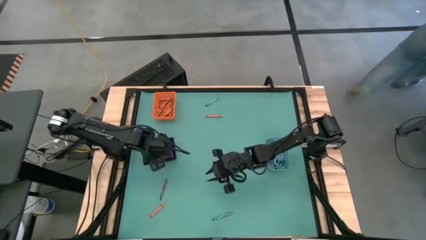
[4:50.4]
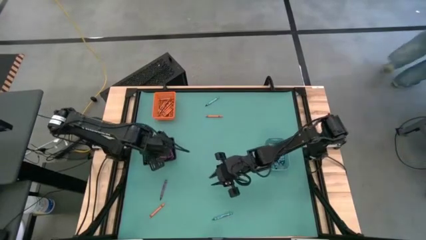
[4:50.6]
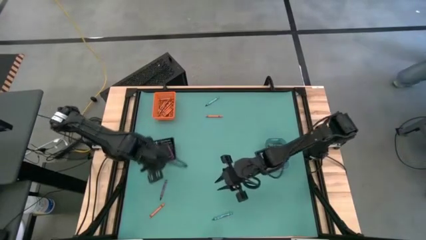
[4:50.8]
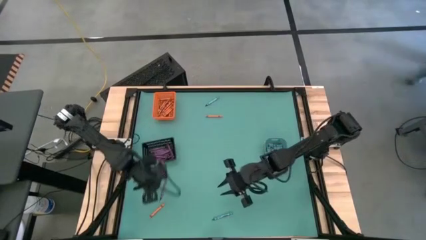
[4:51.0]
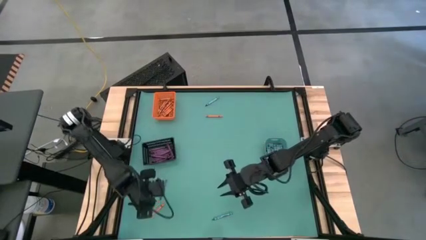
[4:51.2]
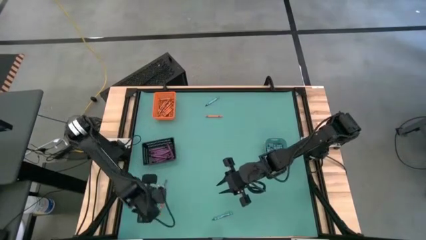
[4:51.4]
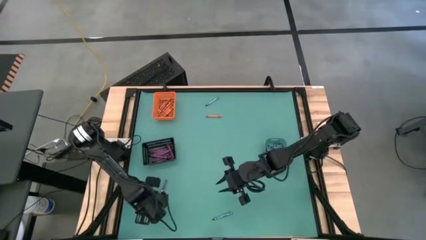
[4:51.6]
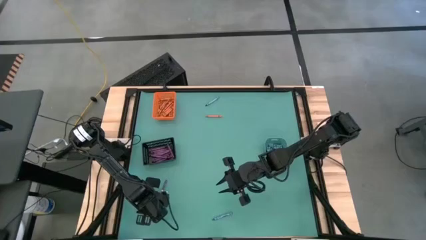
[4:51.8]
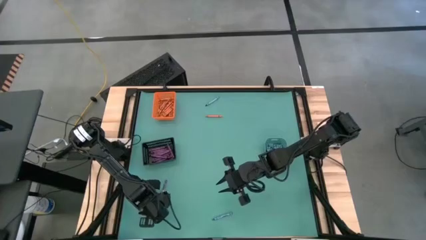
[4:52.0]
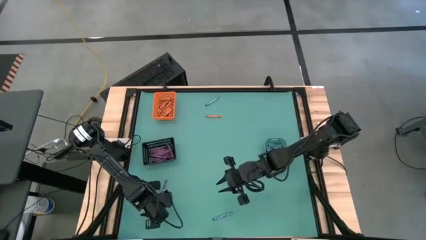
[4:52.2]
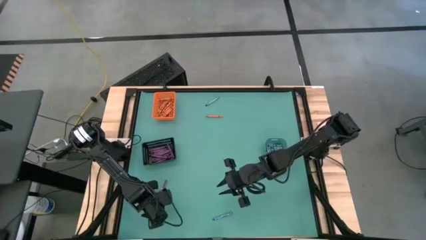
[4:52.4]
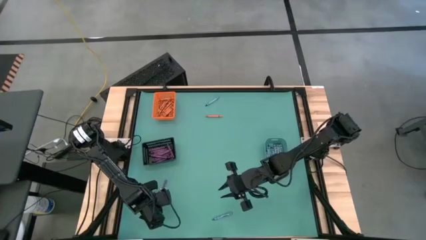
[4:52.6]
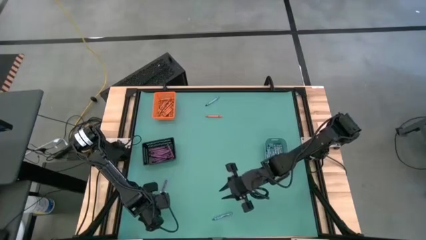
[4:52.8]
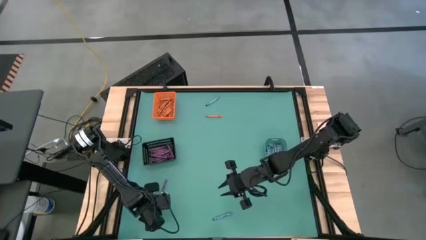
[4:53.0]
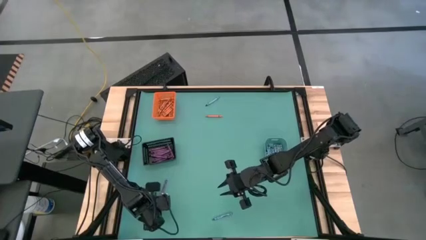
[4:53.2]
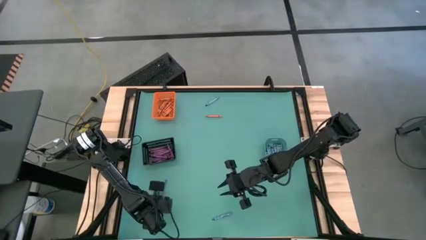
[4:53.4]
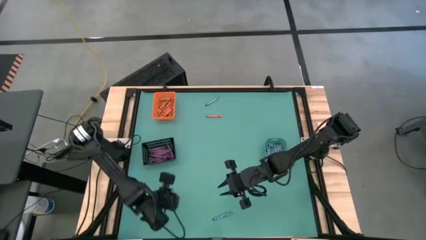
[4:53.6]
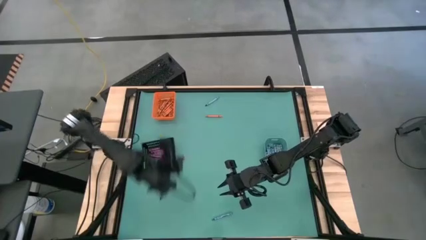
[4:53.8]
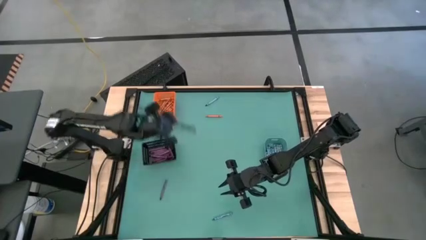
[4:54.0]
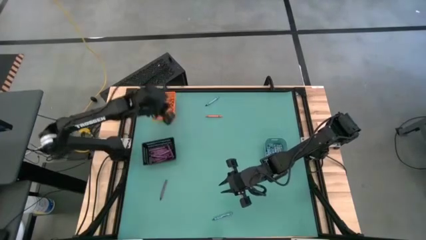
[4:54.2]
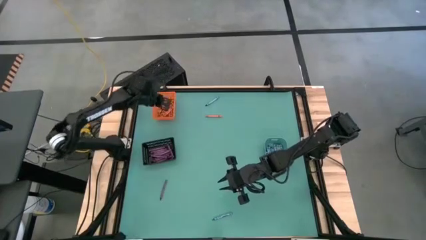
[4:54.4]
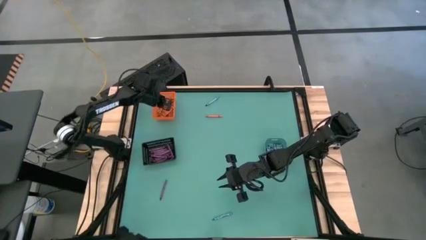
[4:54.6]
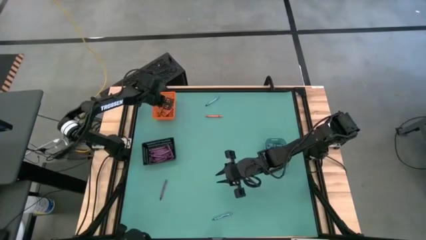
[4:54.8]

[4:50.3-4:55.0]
Task: Sort crayons
Put the orange crayon into the orange bin

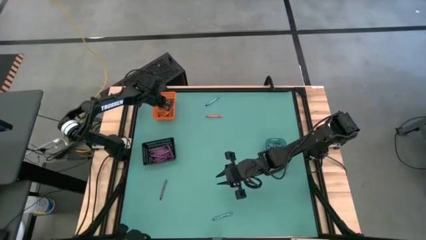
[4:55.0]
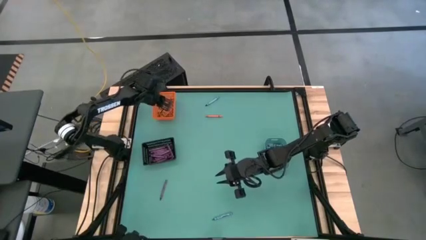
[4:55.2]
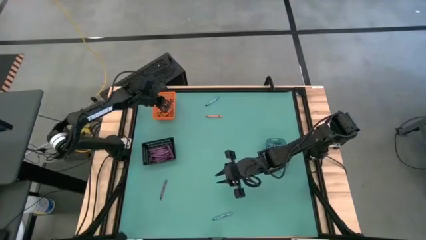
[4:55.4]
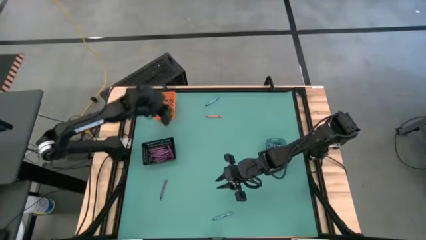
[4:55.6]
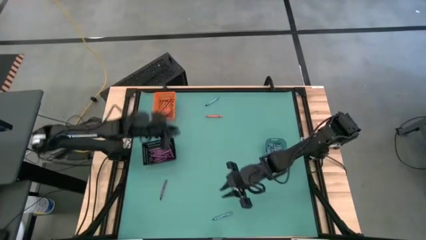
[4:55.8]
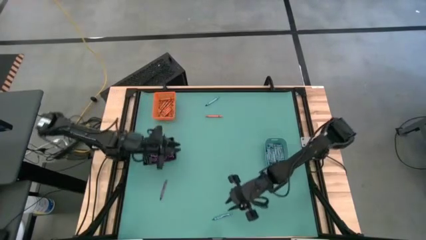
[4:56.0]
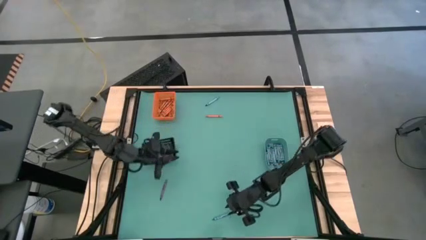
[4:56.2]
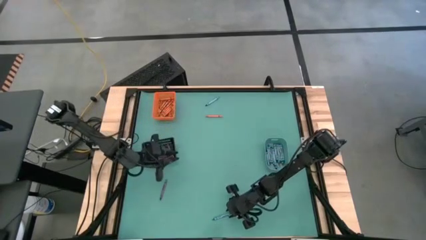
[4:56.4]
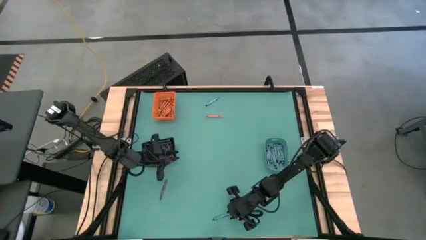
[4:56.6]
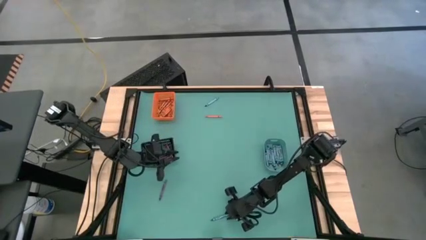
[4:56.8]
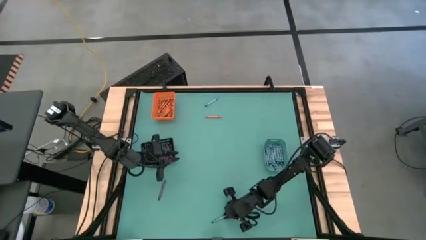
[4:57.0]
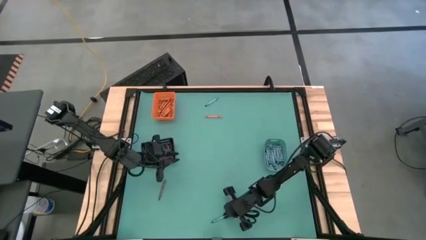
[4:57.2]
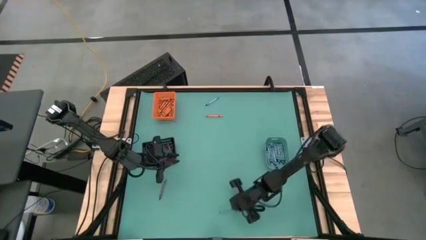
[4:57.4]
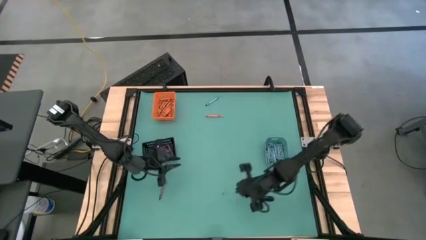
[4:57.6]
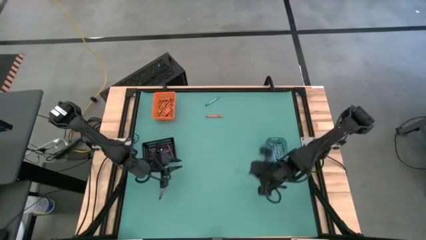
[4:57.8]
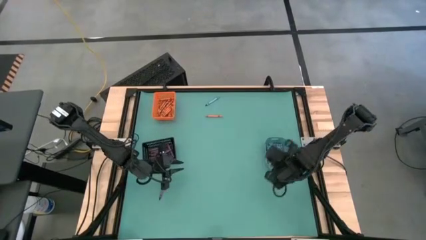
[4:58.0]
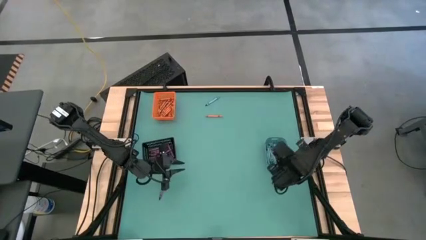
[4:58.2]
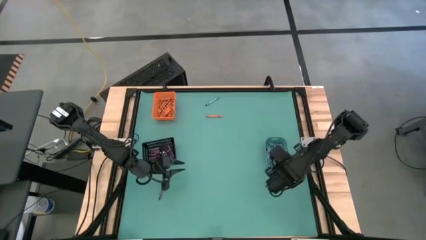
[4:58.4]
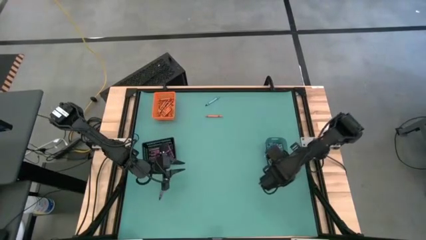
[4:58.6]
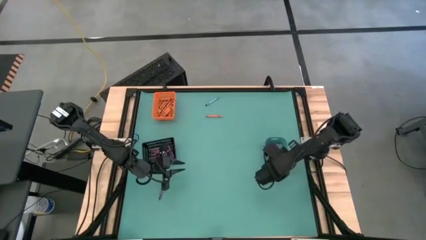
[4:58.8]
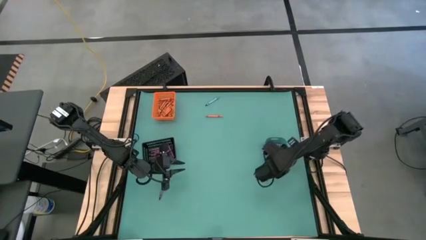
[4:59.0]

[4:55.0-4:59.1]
Put the light blue crayon into the blue bin

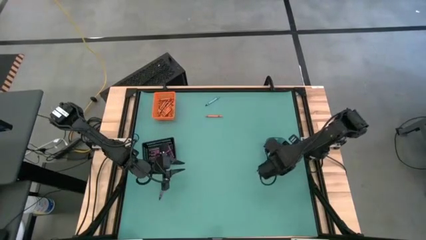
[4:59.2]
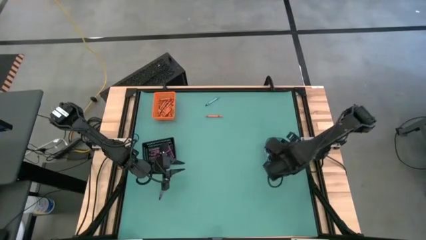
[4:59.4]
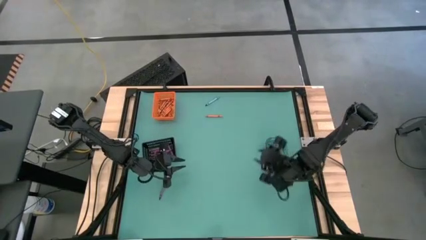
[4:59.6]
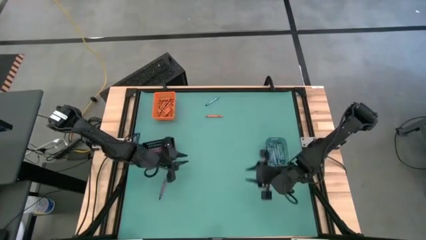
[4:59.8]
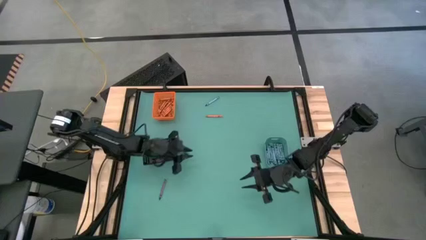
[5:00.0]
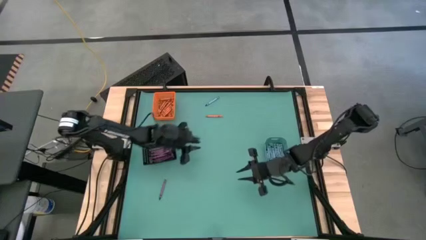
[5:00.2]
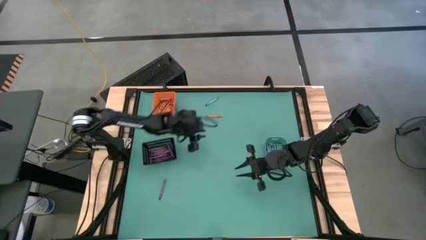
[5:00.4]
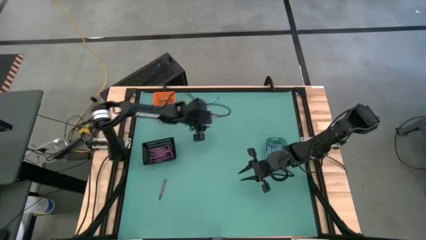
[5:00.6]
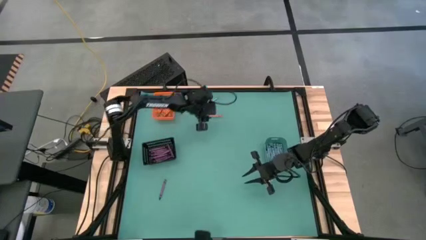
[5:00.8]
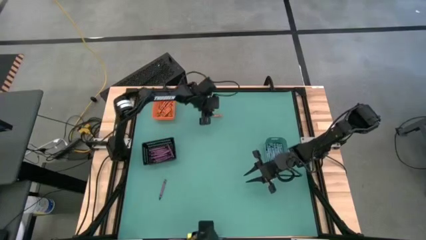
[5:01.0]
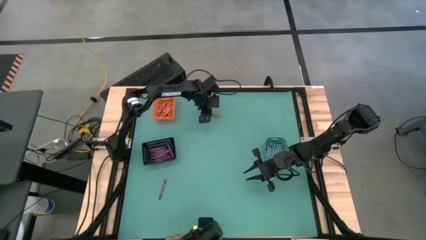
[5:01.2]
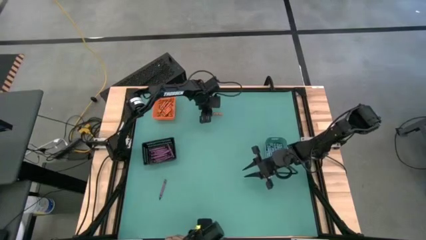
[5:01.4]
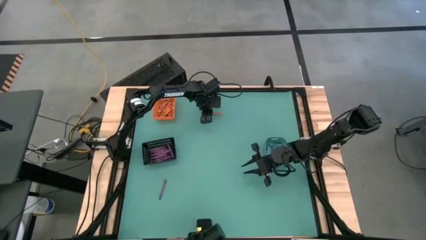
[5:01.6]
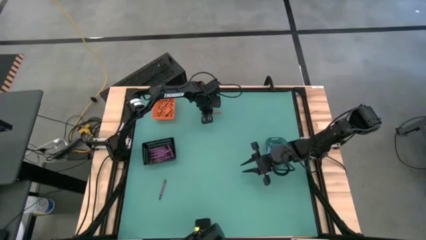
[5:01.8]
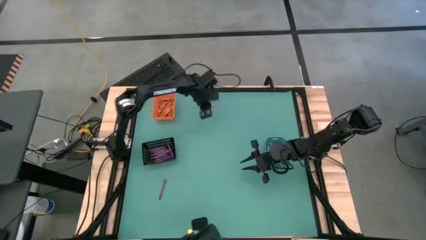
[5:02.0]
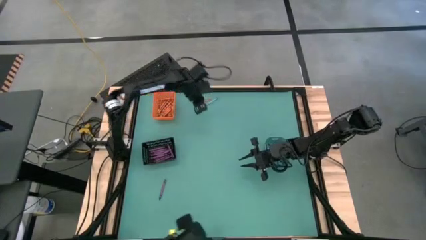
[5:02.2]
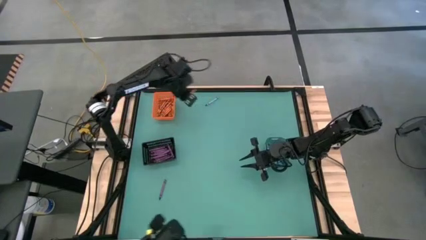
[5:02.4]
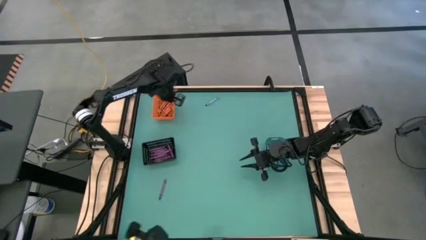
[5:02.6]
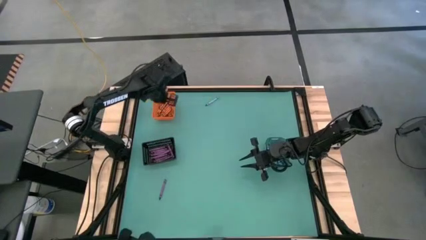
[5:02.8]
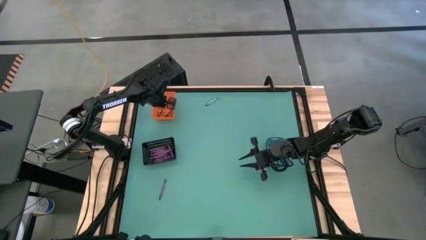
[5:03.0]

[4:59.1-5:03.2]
Put the orange crayon into the orange bin

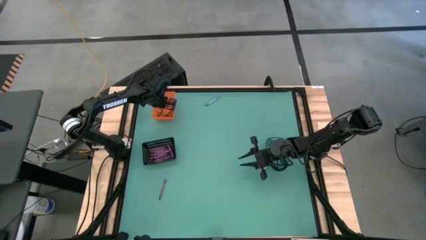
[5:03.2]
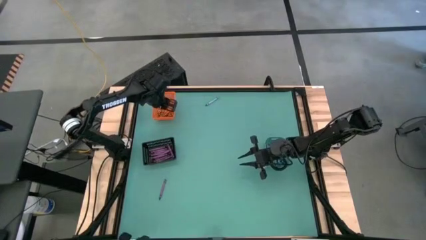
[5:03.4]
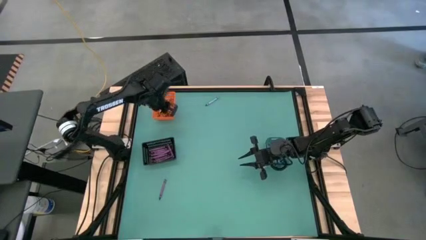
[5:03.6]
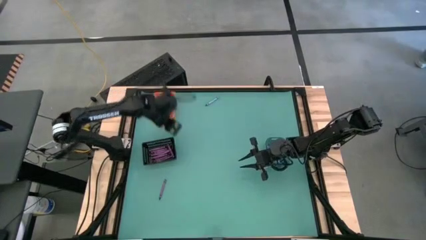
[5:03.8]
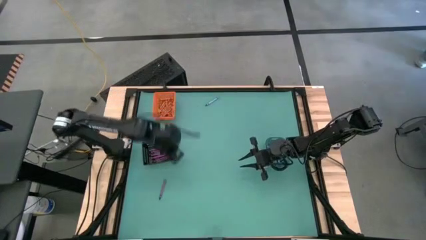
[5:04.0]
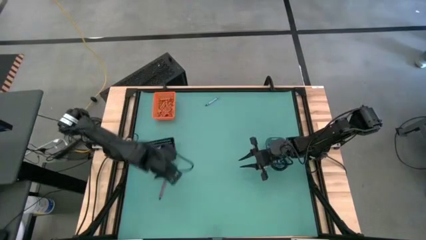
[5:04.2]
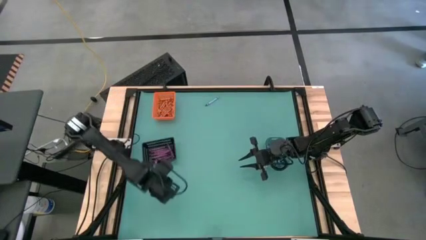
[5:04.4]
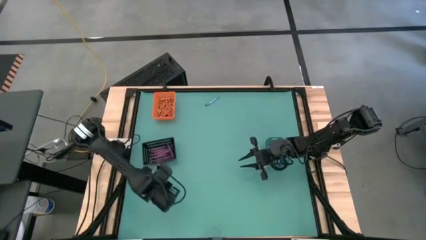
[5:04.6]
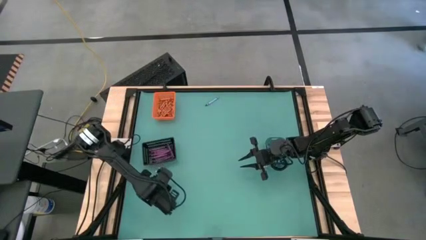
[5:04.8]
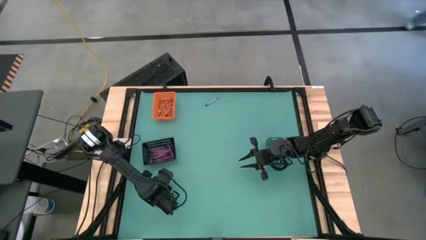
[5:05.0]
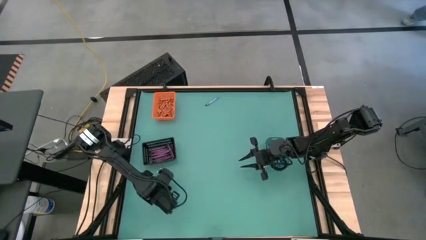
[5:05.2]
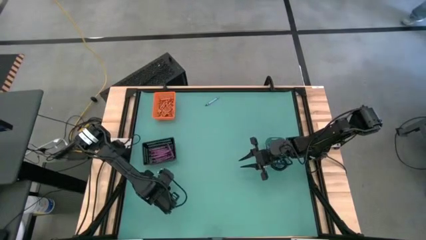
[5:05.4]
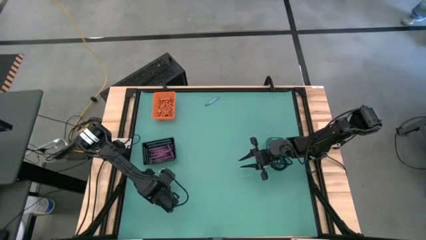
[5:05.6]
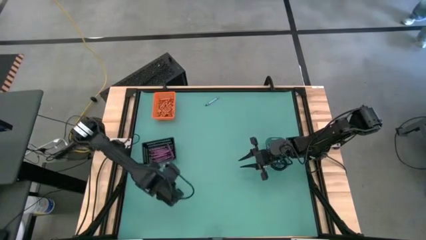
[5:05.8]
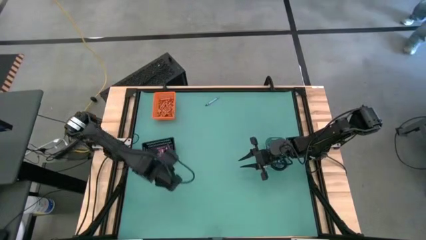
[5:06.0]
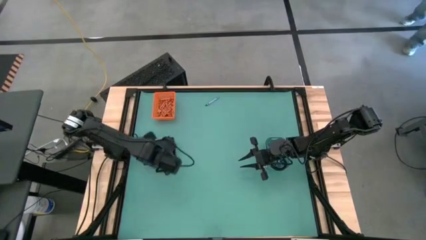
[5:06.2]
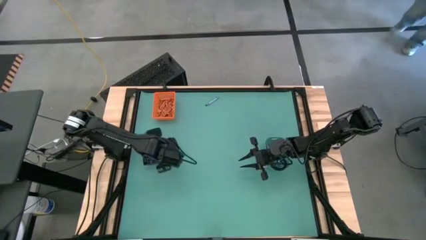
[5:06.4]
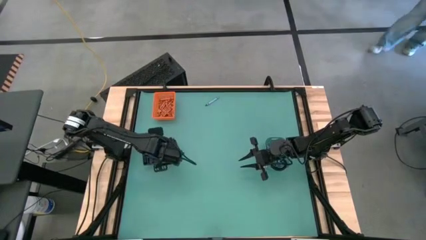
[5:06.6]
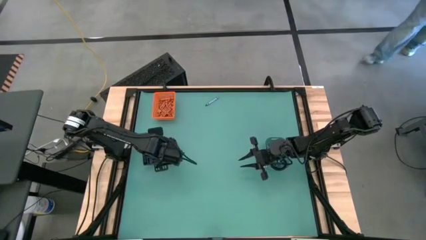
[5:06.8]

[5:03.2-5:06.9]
Put the violet crayon into the black bin
